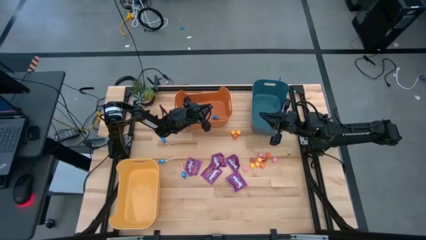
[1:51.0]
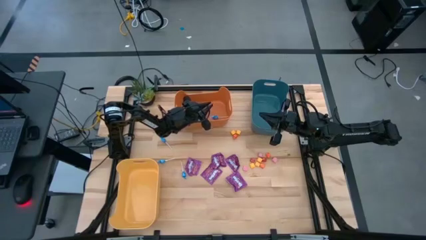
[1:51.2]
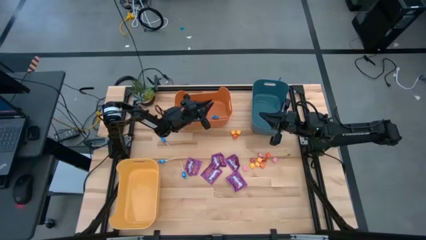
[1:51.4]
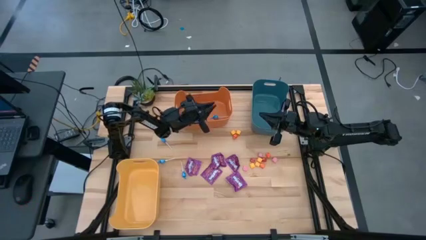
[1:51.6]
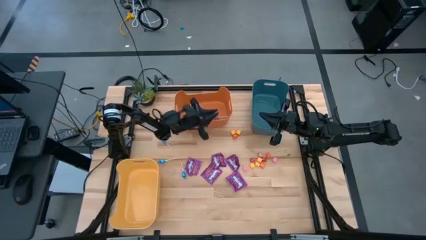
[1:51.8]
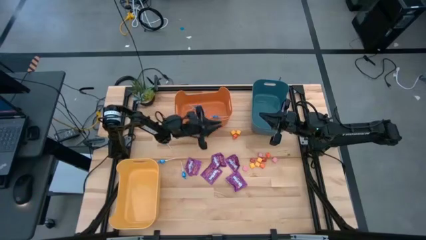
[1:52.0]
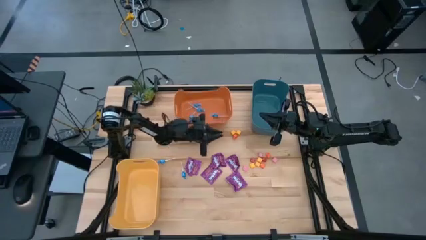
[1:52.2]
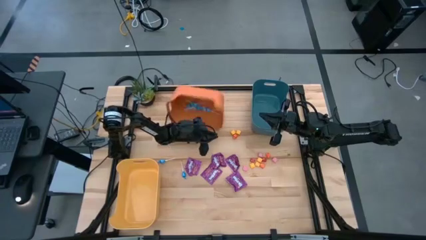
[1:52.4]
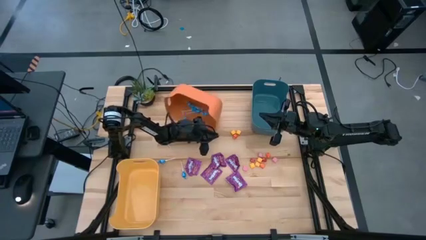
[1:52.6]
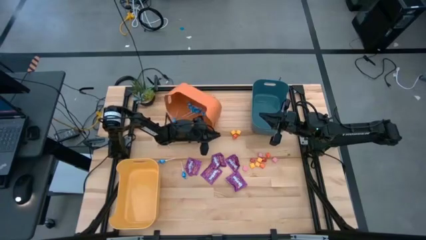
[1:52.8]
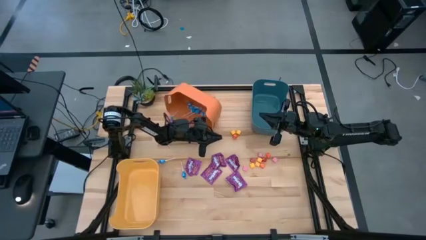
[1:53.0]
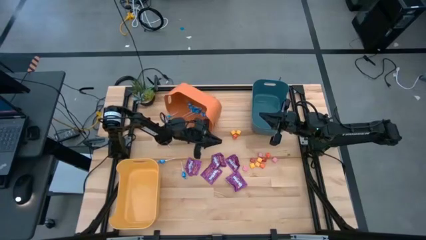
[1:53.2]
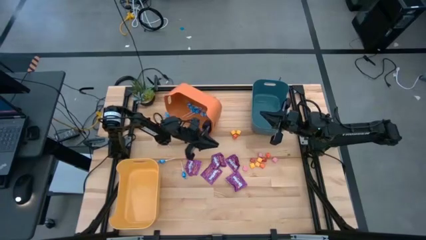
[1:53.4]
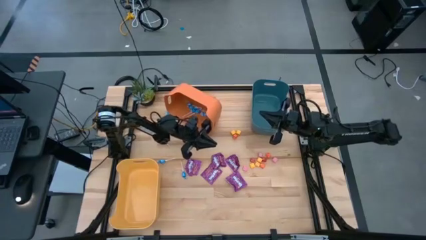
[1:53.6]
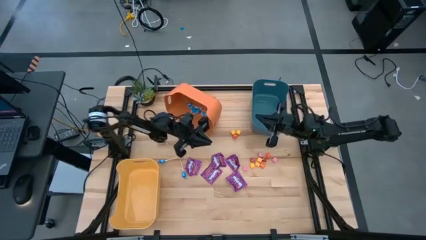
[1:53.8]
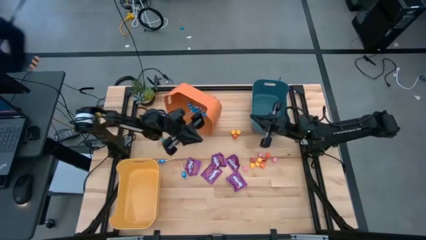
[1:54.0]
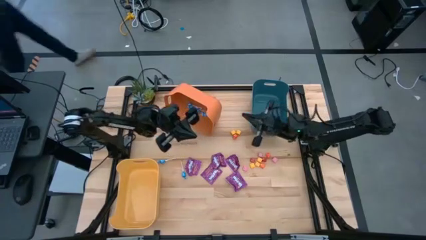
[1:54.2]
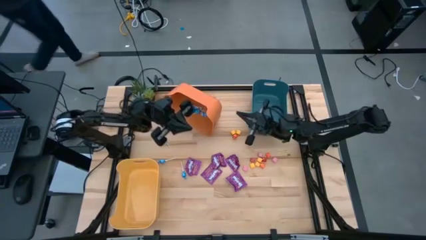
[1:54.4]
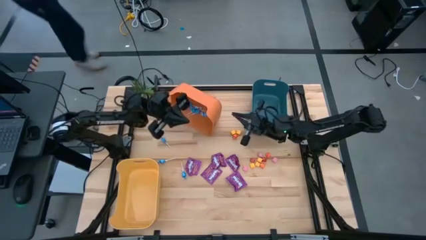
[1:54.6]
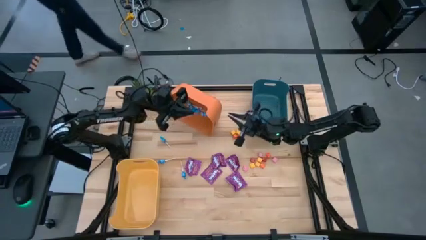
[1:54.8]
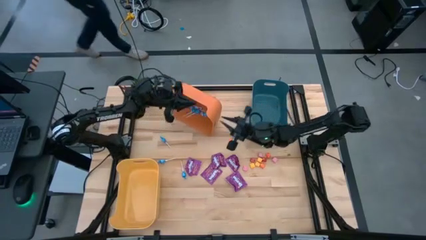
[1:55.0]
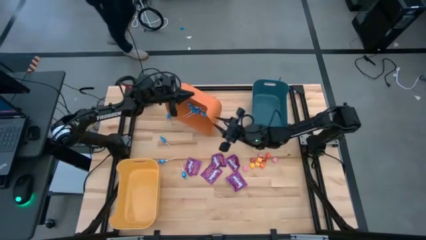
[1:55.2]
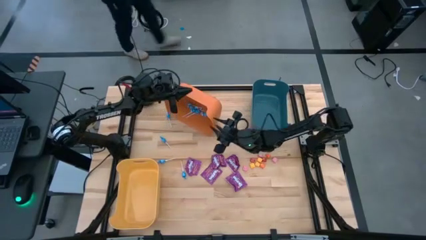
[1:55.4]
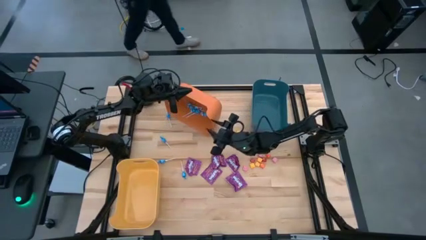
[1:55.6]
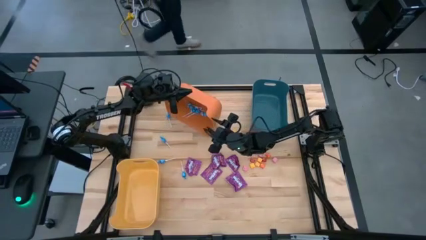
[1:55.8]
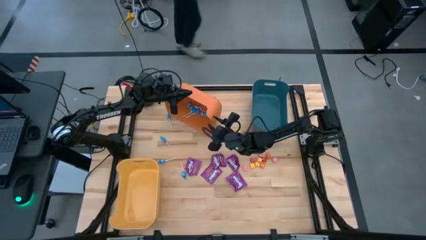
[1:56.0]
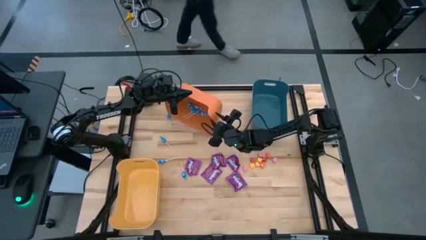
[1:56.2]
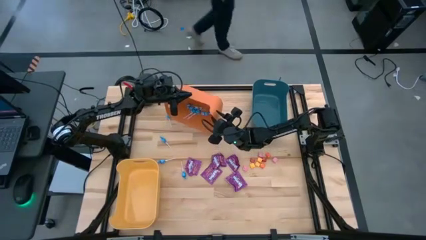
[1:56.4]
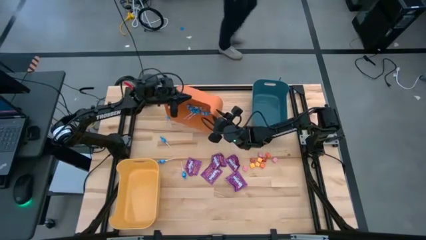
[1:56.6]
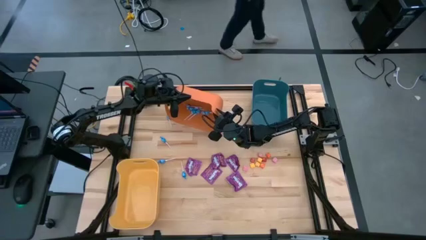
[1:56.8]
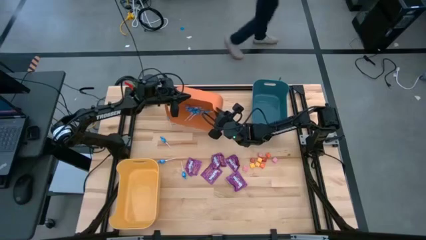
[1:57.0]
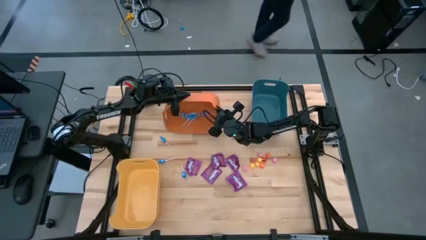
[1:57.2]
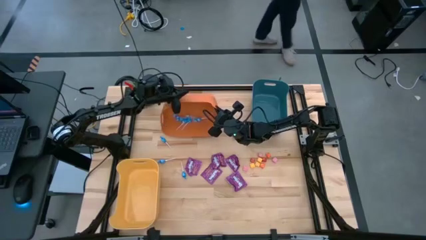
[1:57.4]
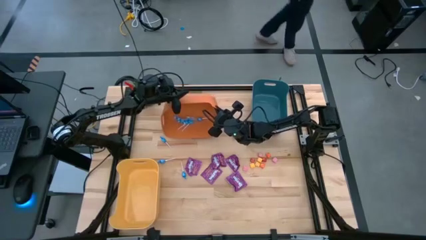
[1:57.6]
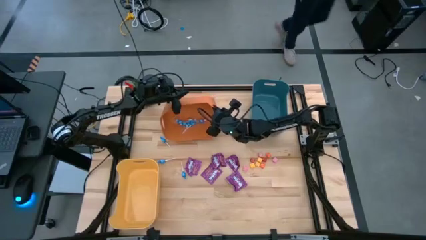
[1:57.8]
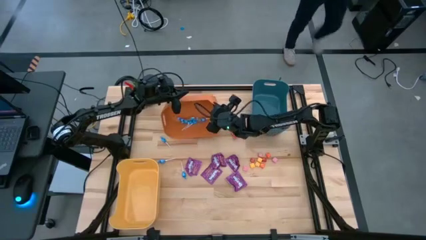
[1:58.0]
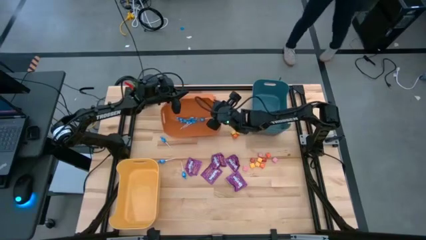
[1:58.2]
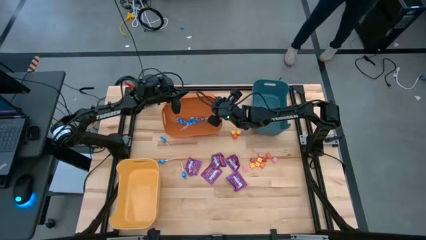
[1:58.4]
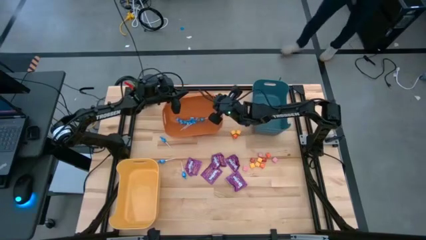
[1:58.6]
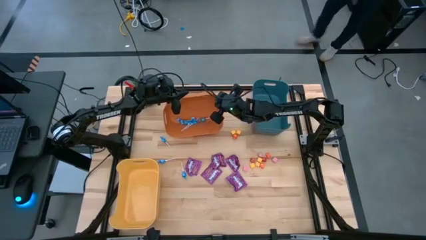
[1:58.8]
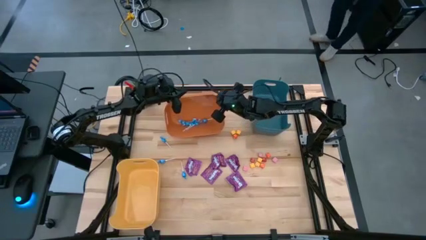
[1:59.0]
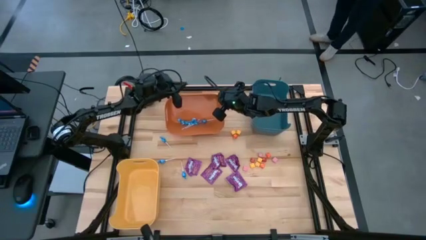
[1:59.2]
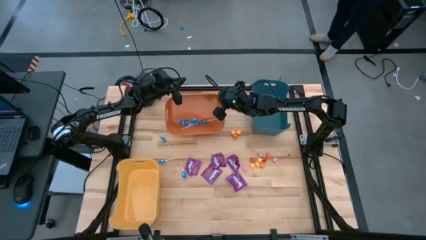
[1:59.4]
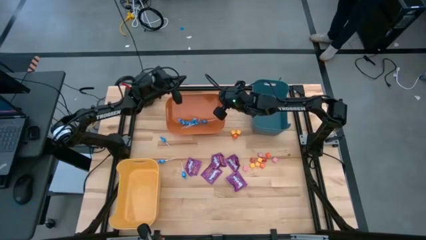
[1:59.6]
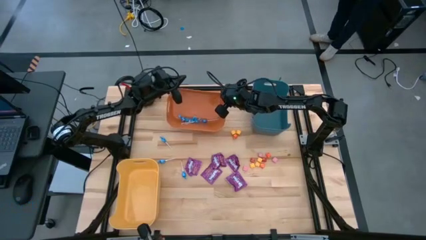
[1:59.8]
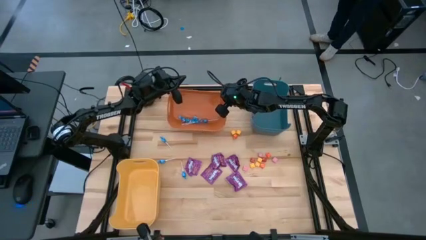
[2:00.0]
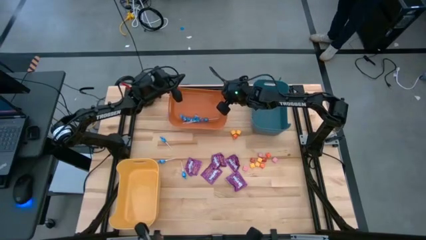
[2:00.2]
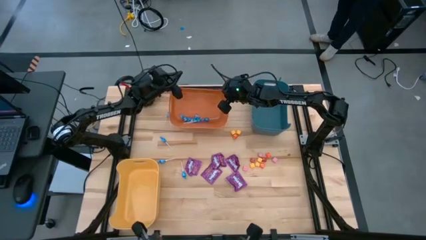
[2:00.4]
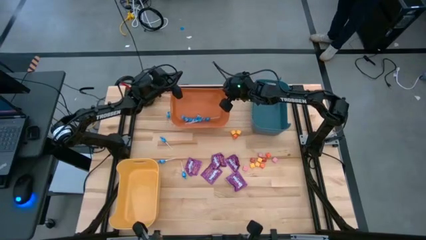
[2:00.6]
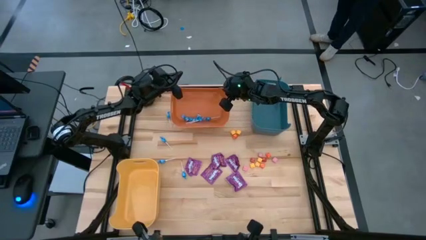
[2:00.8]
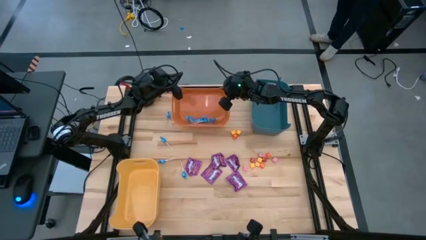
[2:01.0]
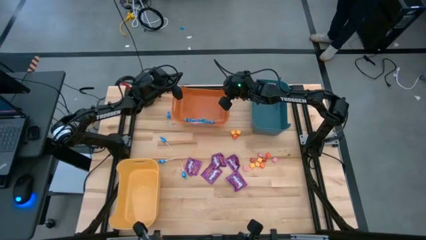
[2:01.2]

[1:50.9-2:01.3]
Task: Sort candy
Adjust the orange bin

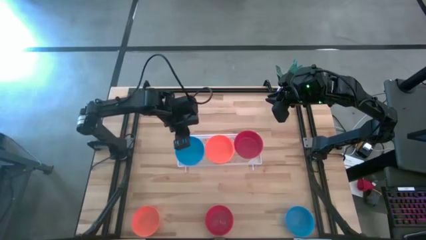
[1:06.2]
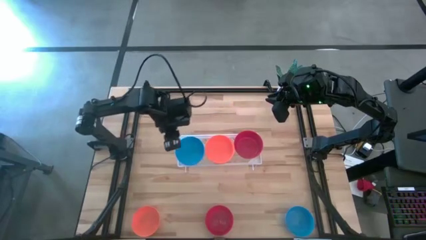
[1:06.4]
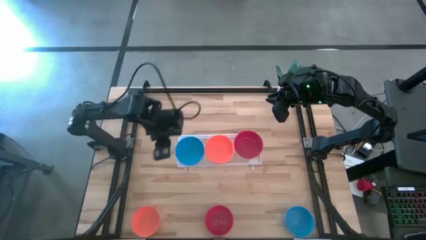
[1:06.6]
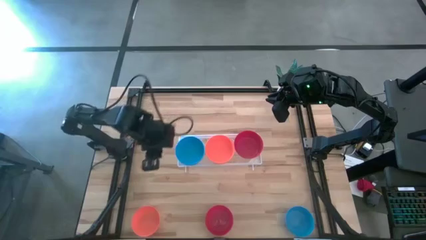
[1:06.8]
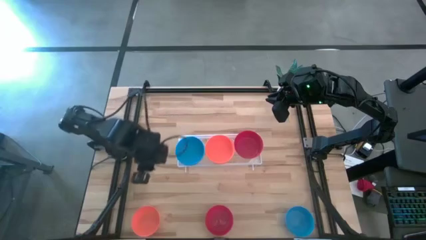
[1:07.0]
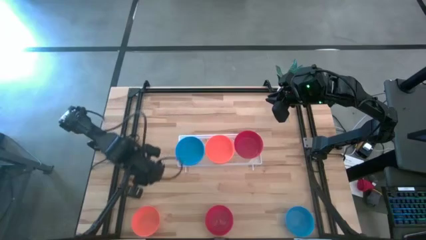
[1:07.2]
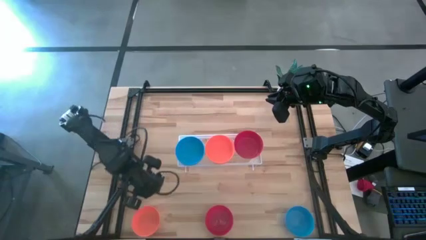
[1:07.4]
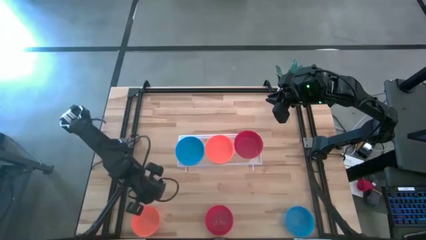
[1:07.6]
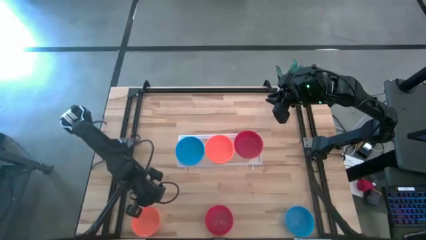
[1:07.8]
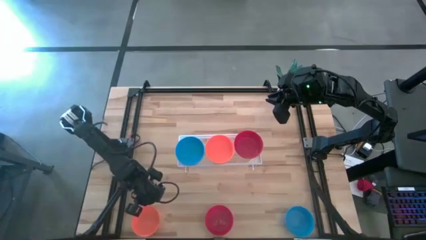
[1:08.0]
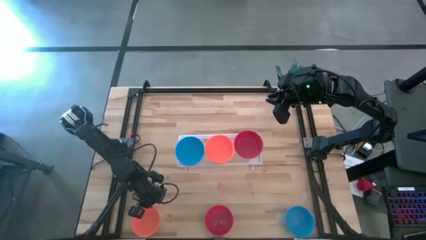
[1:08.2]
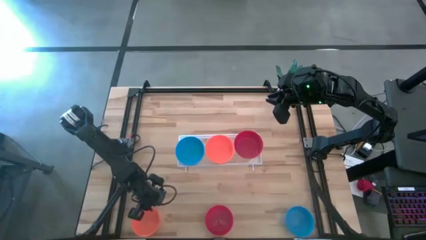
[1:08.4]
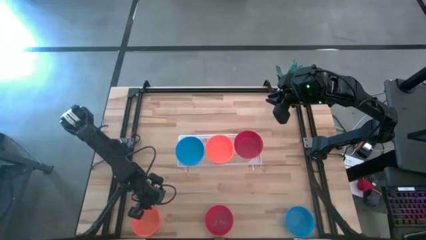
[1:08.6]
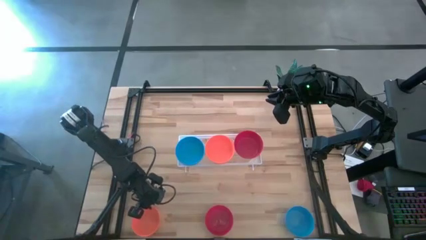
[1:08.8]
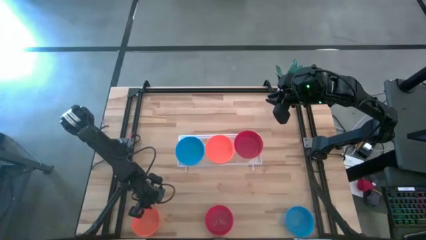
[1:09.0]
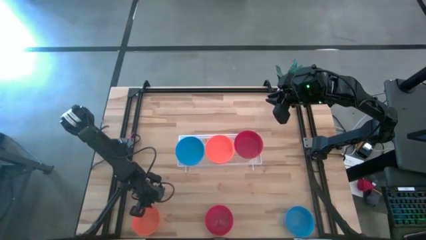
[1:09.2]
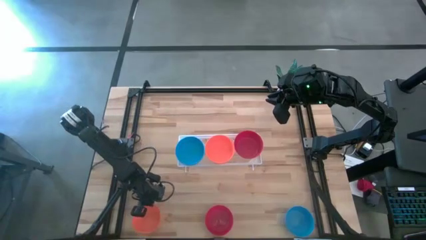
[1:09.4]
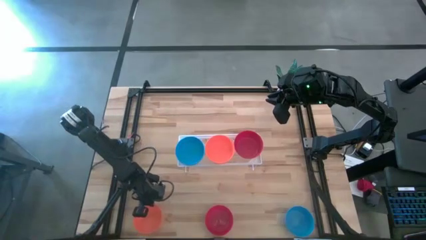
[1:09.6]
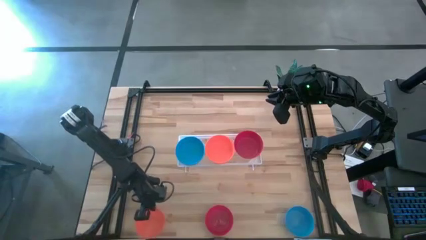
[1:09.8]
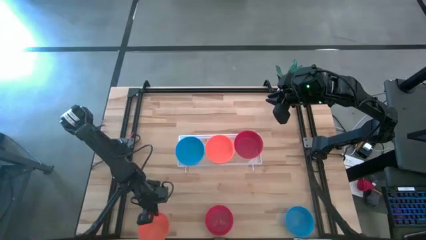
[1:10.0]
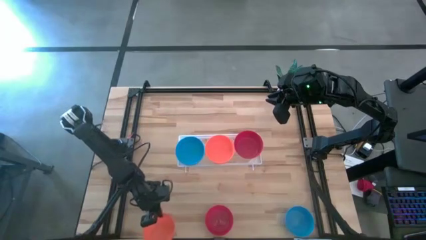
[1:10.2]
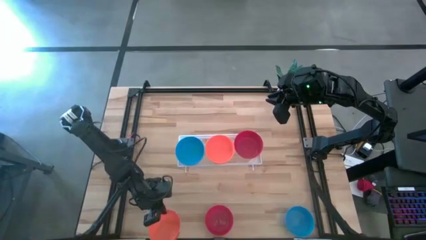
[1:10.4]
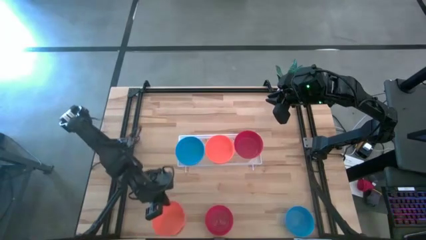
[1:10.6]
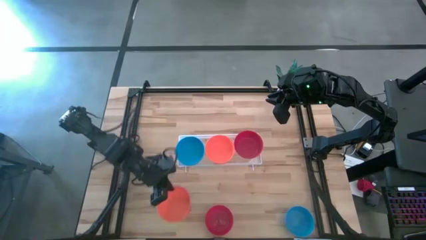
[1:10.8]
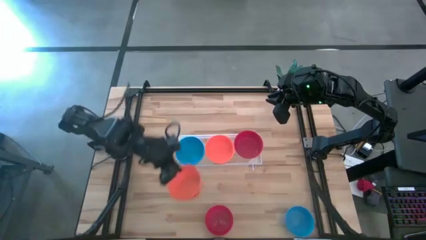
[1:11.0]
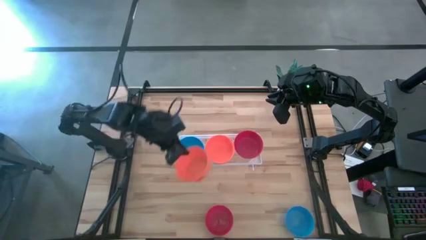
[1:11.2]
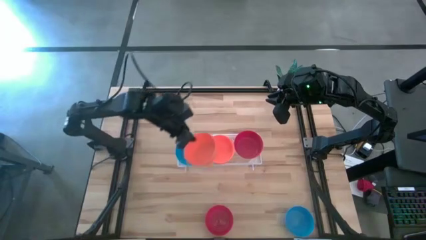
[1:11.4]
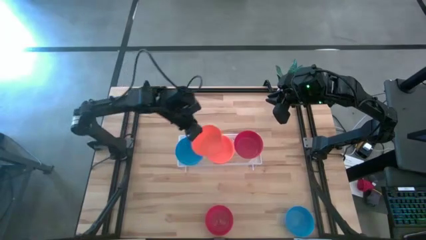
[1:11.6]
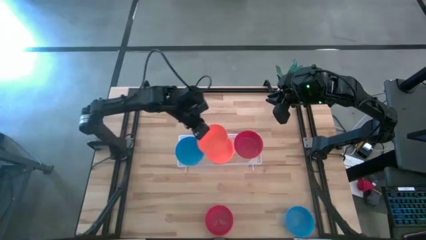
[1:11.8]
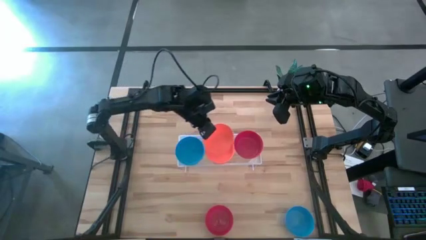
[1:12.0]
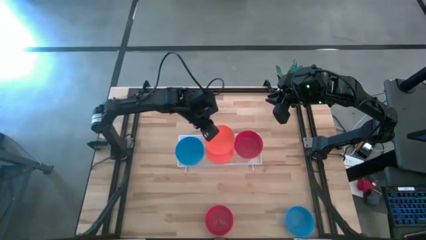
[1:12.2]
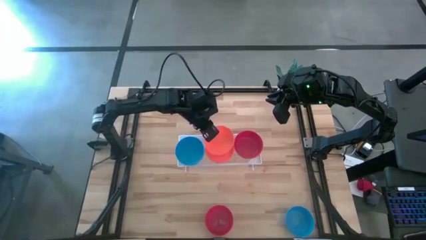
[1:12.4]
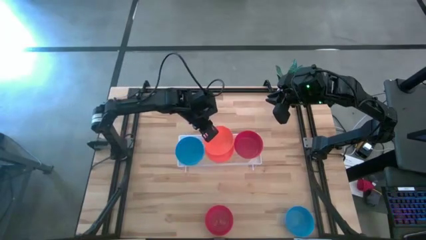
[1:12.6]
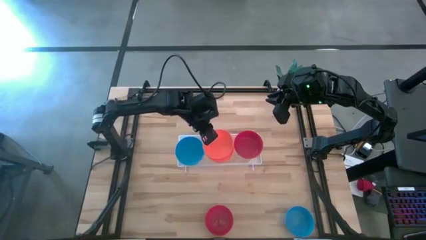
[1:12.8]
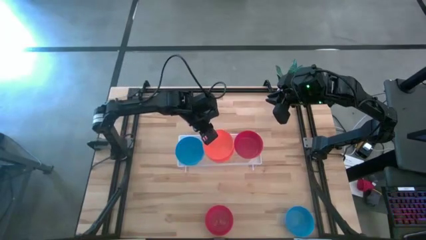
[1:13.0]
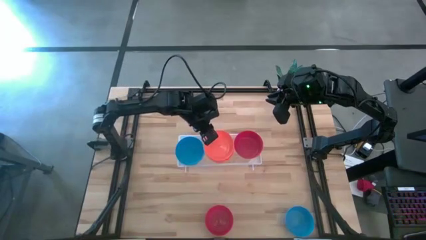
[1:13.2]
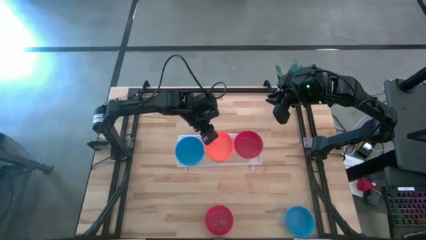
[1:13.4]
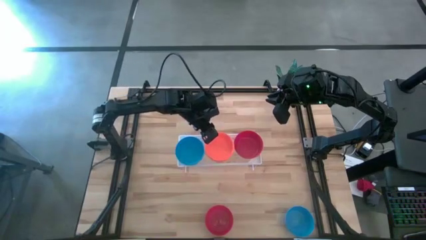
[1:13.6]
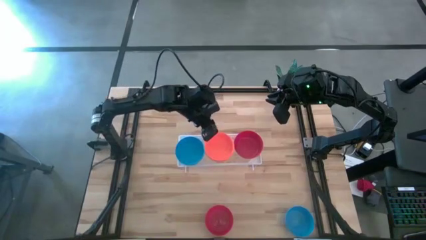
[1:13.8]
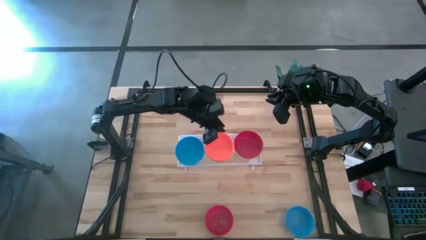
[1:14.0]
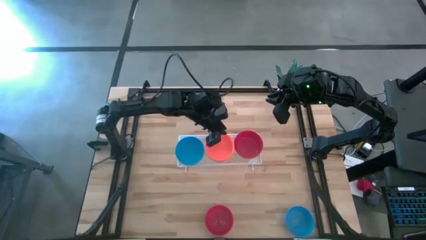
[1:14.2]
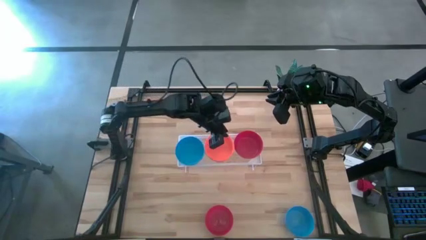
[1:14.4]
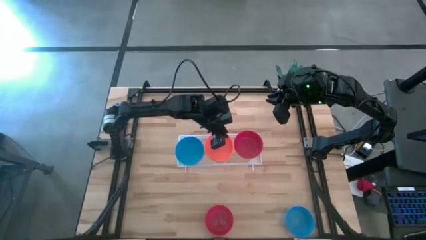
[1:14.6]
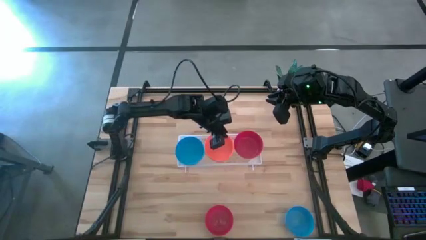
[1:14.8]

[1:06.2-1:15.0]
Task: Pick & Place Mini bowls
Stack the orange bowl on the orange bowl on the shelf
